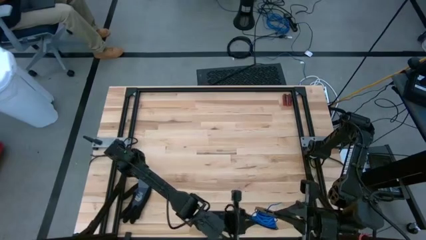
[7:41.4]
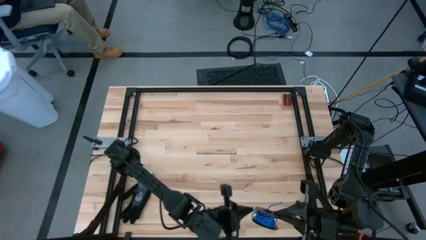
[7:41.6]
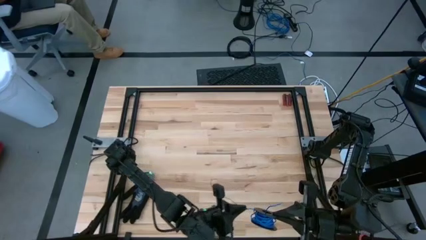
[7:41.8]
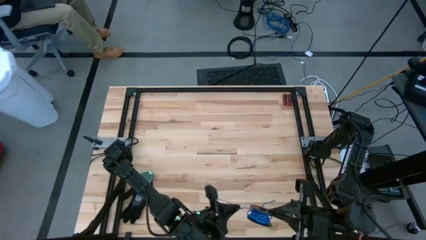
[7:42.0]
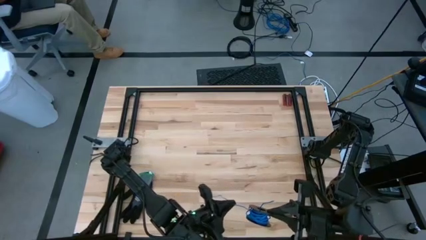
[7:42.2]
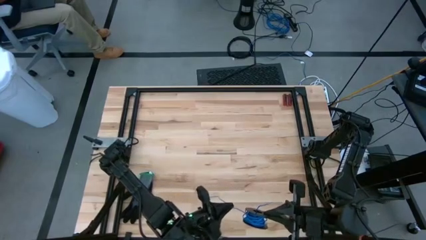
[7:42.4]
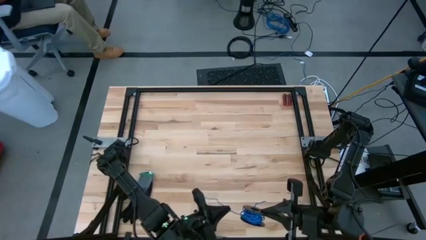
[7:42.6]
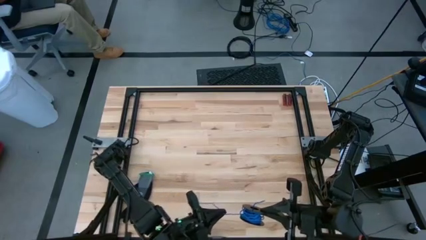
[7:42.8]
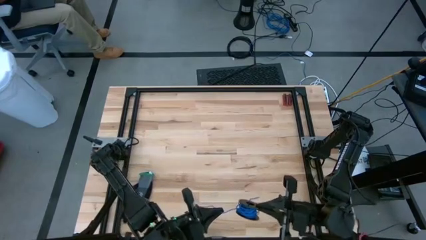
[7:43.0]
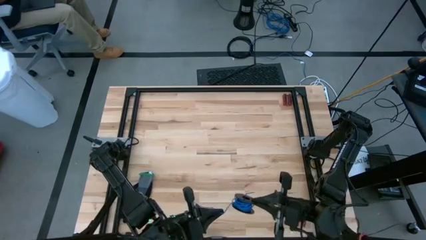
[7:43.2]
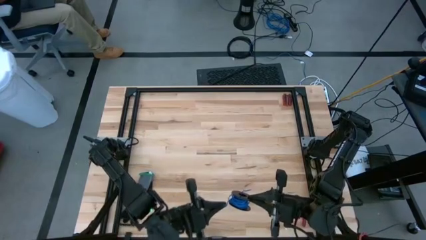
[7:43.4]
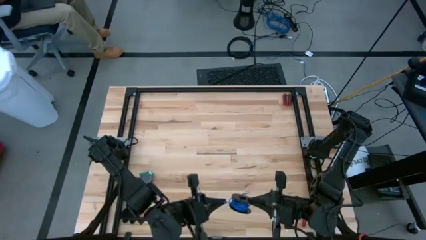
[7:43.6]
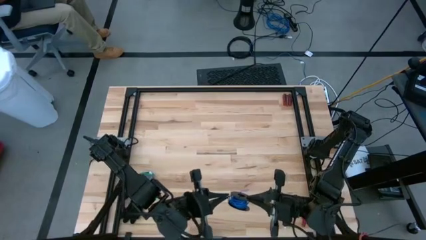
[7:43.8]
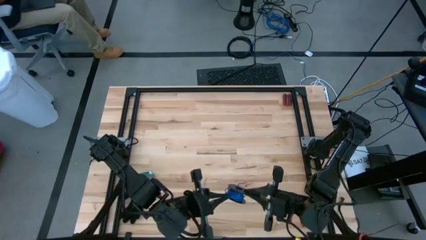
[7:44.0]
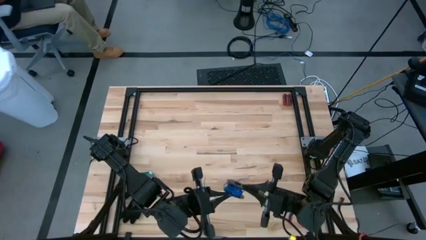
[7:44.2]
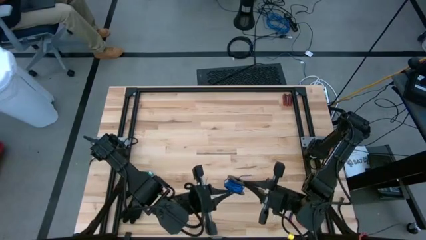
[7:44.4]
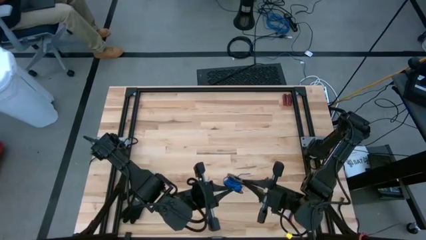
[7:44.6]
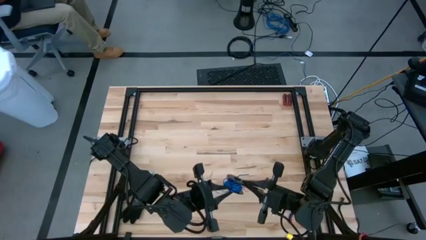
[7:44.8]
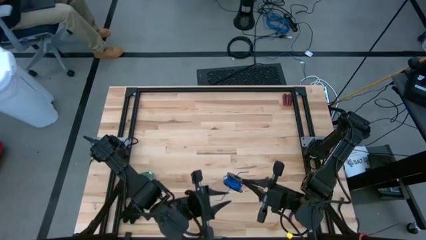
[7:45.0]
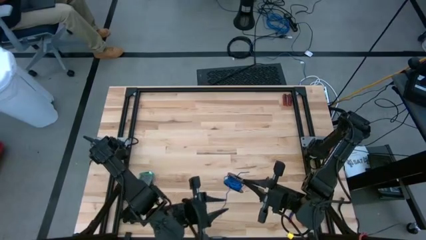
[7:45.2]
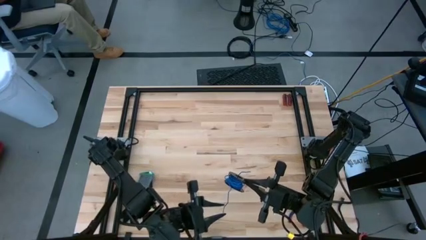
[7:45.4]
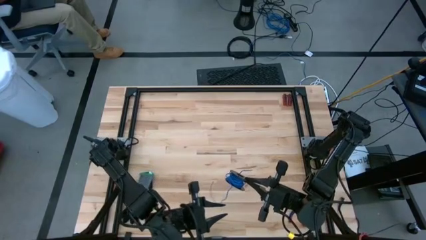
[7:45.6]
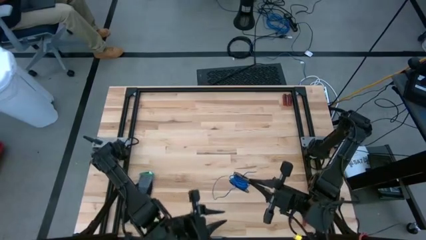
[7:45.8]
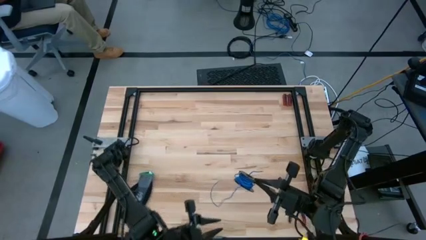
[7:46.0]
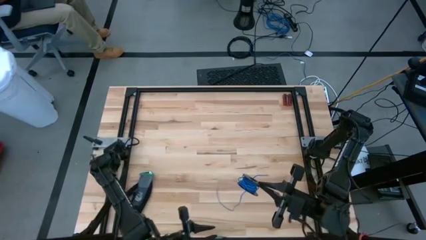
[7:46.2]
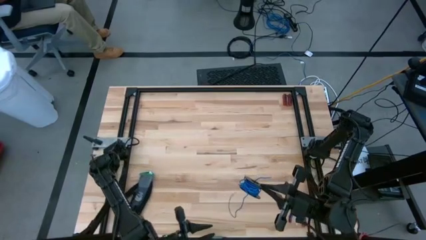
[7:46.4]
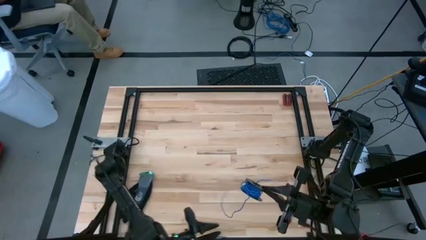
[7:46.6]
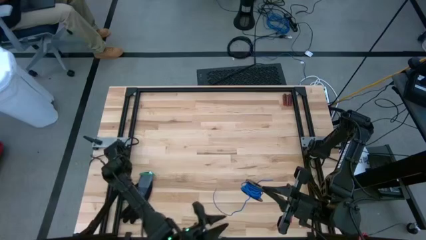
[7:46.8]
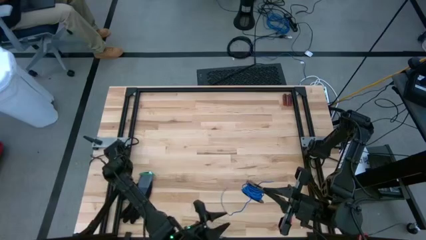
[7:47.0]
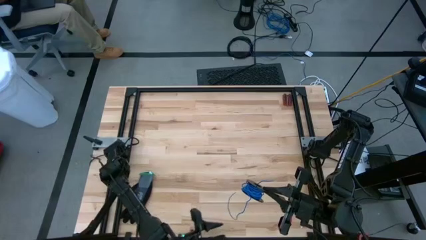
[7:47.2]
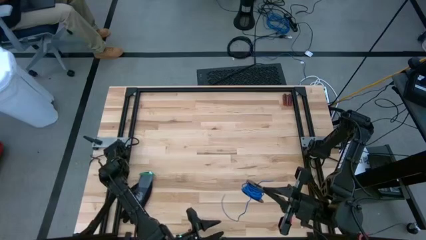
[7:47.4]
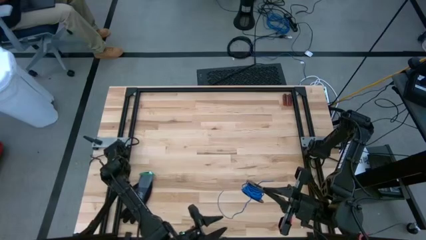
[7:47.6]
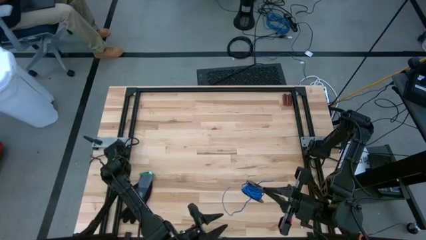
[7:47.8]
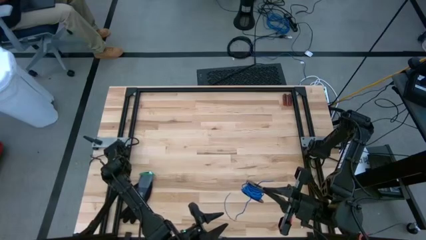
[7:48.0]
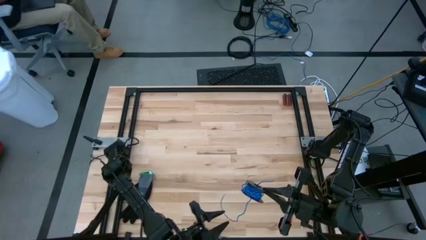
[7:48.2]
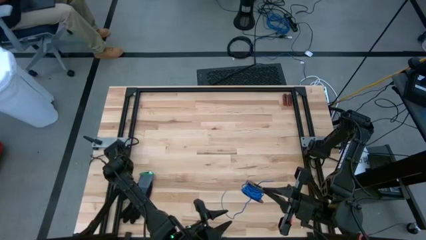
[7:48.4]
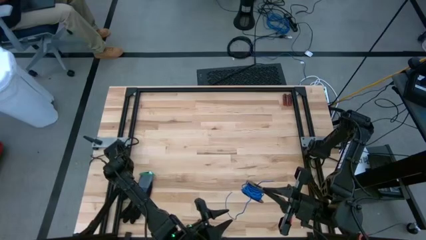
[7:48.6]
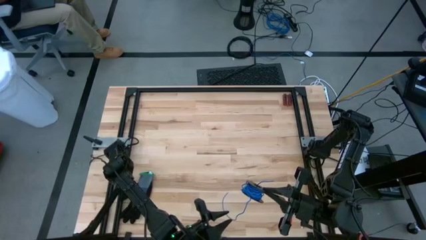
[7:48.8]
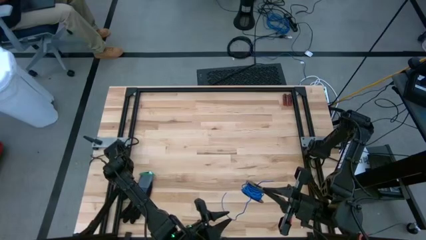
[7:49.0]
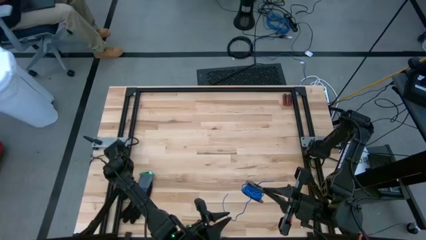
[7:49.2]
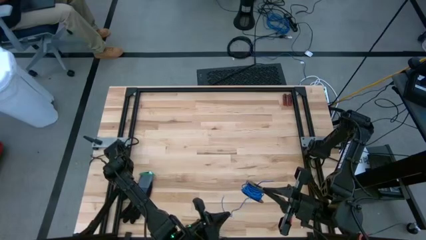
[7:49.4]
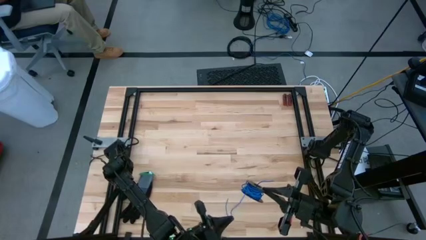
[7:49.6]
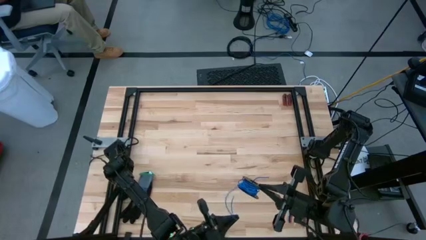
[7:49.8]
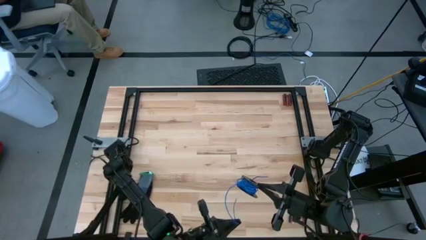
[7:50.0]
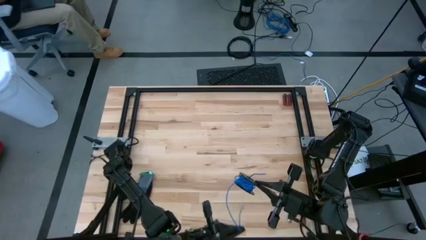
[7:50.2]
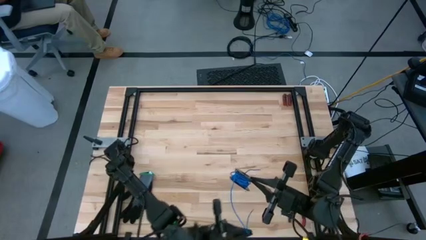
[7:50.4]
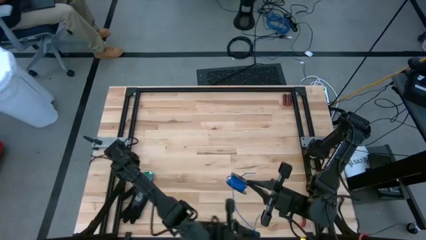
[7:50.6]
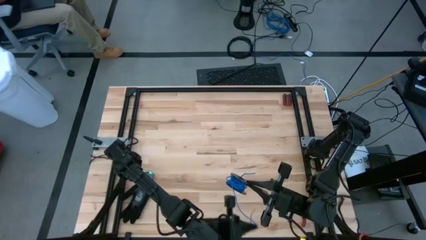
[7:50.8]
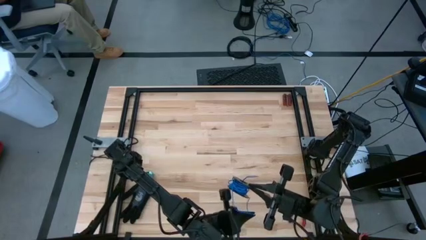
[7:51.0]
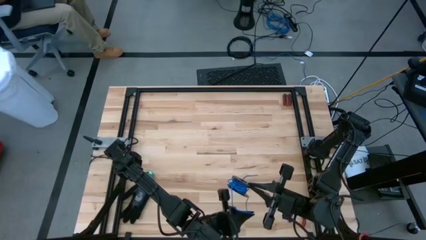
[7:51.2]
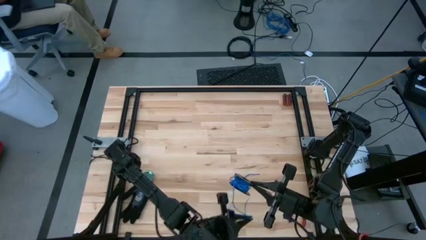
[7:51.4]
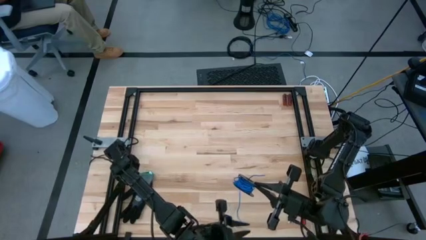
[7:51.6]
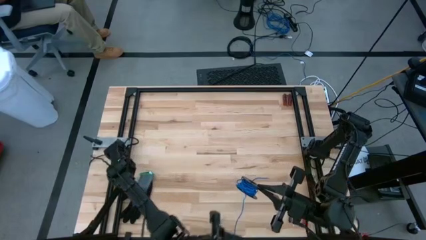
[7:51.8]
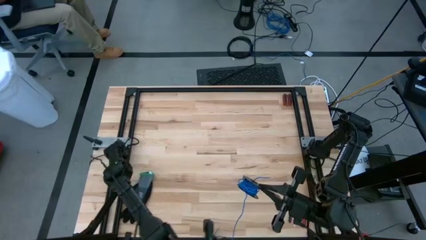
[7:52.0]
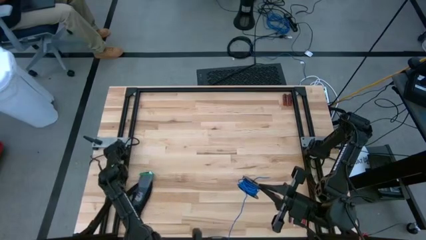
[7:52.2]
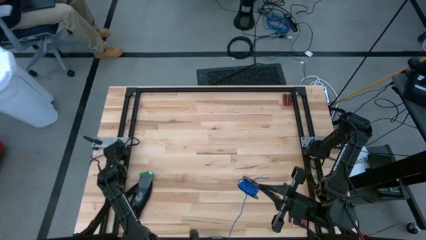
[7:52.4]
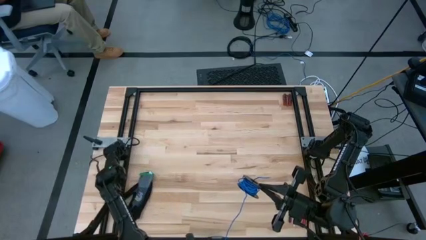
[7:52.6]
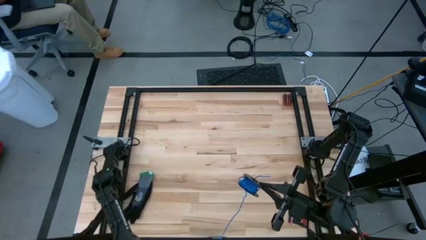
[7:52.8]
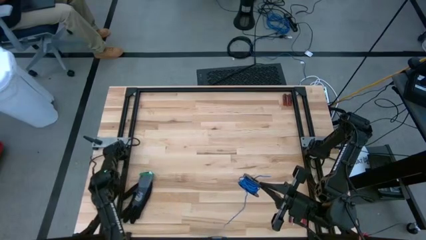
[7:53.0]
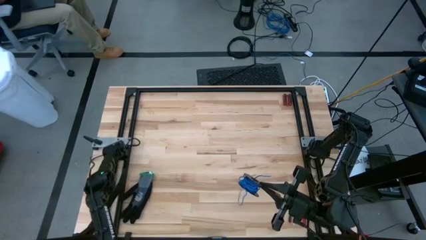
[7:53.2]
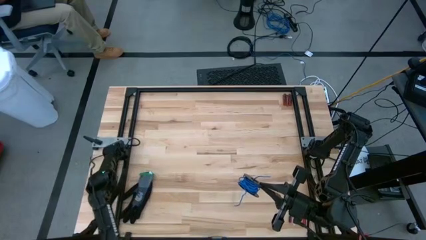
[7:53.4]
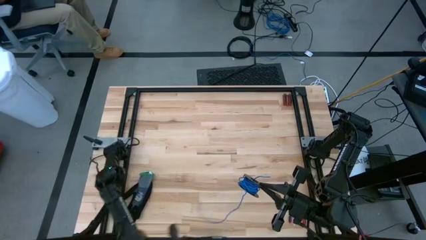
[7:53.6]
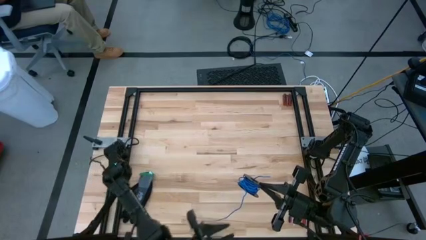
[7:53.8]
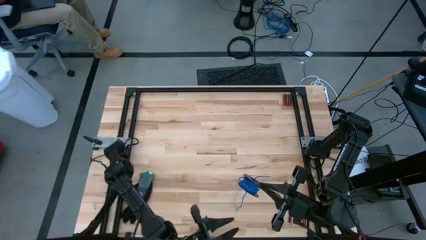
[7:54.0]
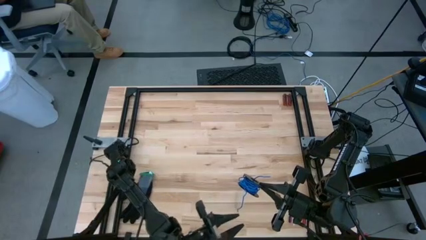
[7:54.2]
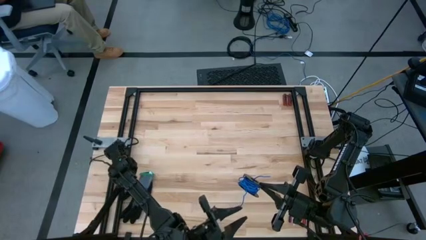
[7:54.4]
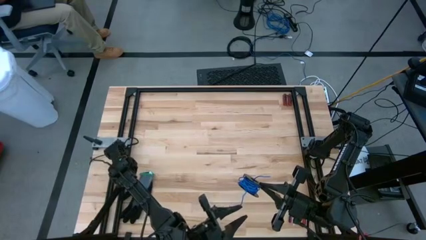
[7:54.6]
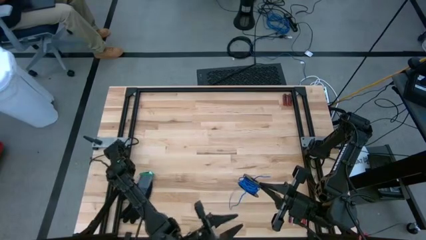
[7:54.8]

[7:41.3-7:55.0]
Task: Coil cords
Coil the blue wire onto the spool

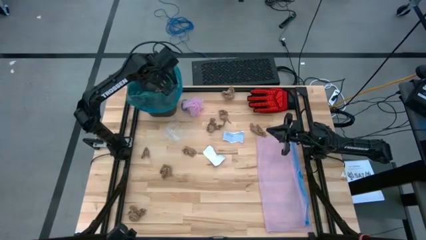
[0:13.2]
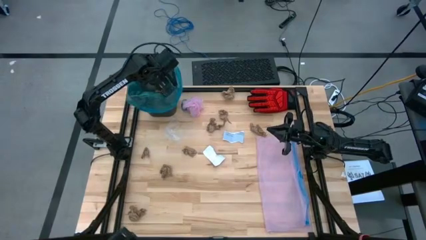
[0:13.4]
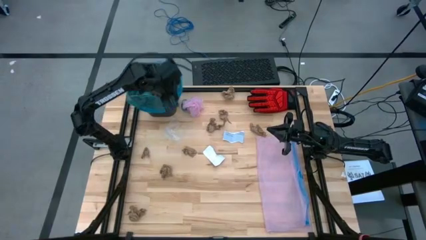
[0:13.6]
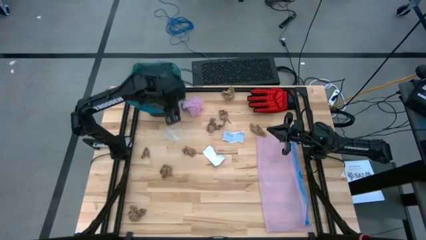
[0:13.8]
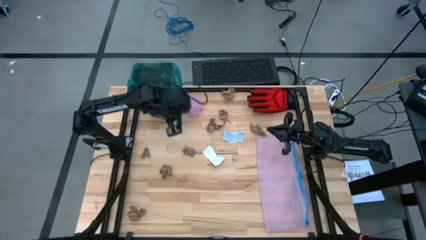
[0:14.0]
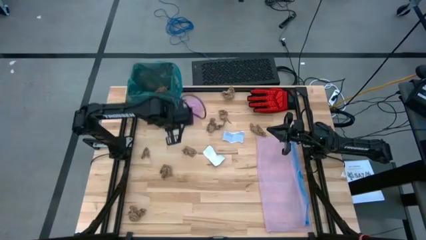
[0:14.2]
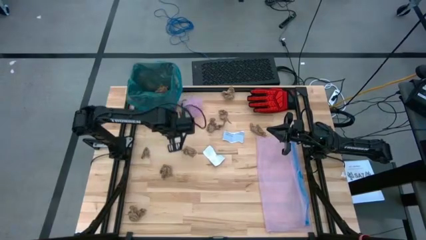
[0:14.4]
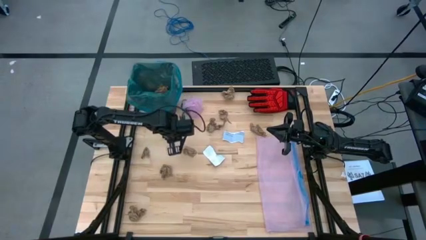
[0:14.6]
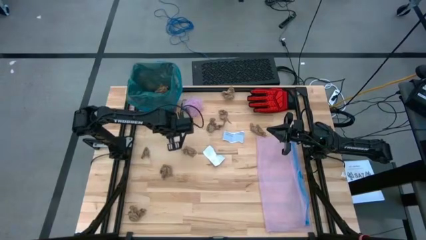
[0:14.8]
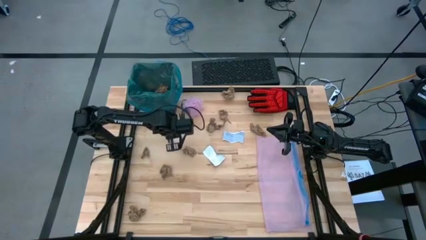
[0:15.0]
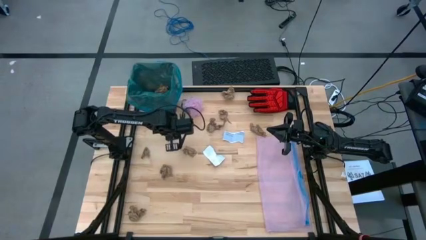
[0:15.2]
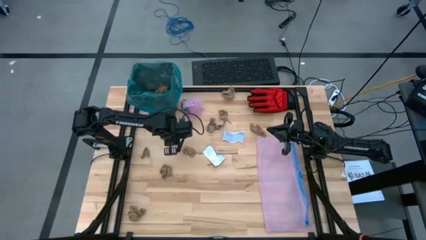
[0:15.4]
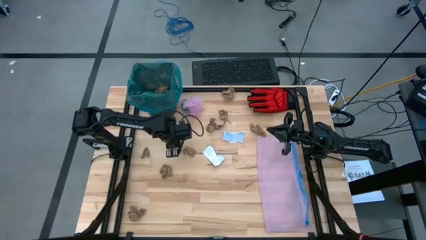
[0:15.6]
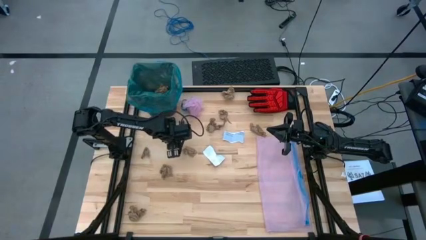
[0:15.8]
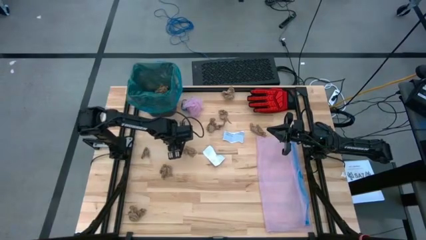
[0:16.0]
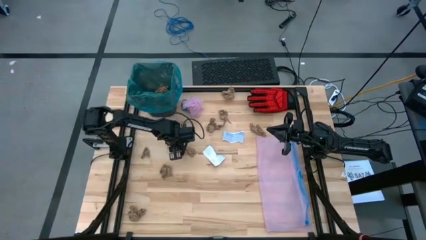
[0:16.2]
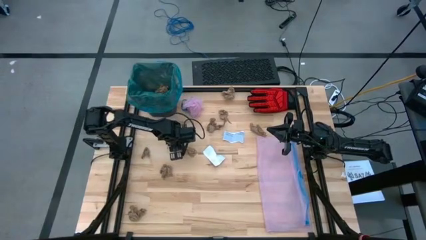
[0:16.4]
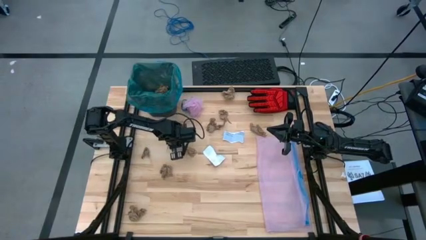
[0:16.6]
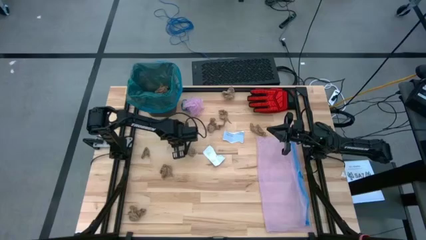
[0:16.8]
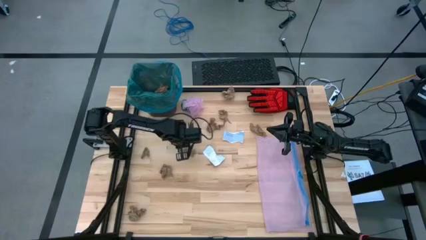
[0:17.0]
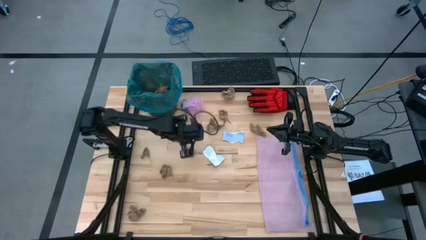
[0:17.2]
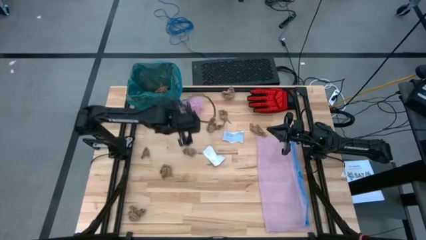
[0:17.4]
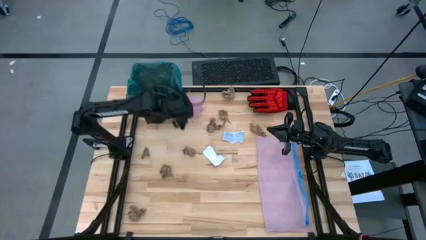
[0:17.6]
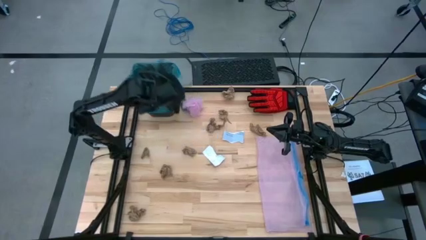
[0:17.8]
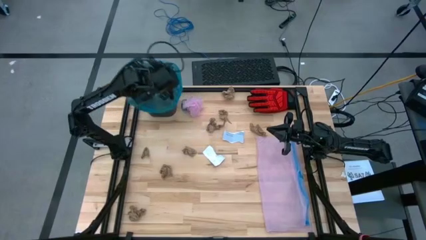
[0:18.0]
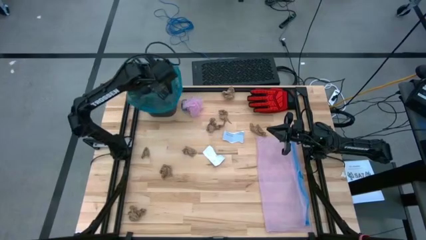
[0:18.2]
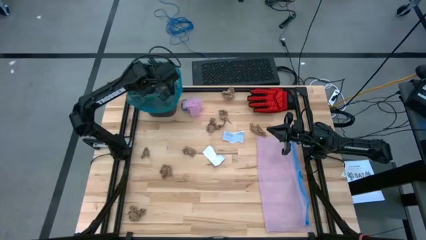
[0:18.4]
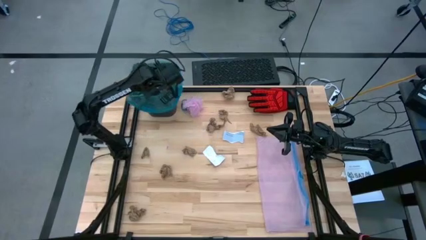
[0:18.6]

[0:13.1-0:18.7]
Task: place trash/remove bag and relplace
Put the transparent plastic into the trash bin
